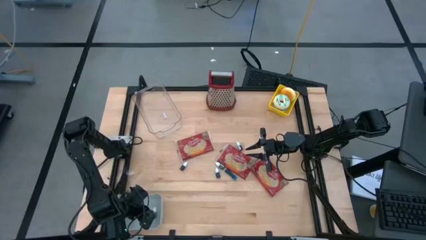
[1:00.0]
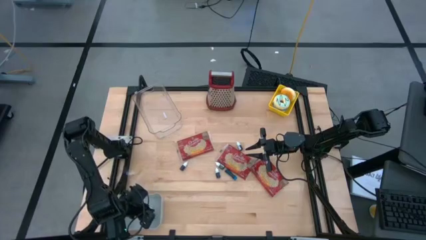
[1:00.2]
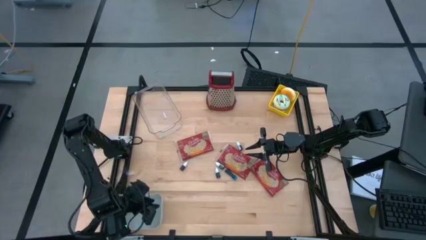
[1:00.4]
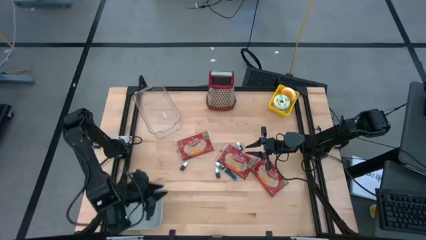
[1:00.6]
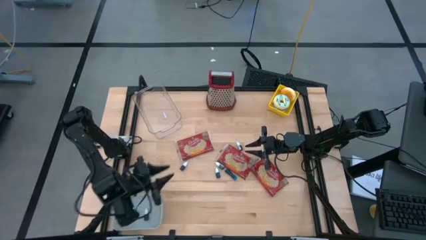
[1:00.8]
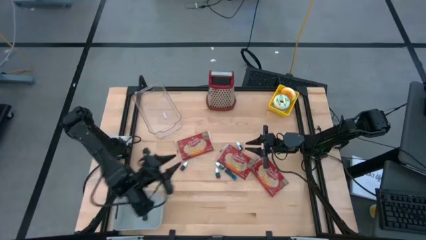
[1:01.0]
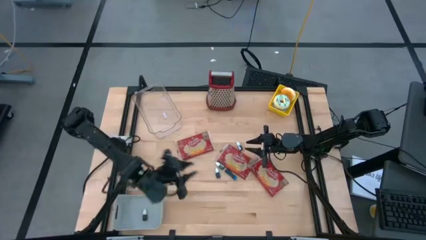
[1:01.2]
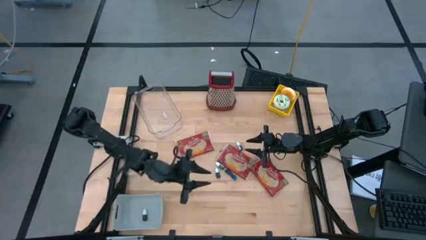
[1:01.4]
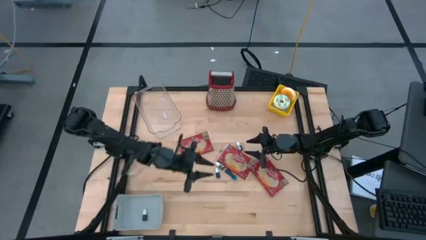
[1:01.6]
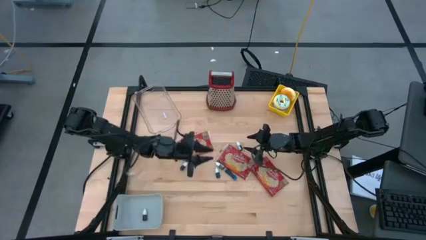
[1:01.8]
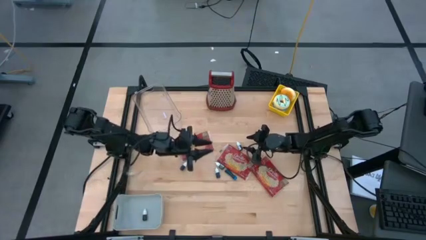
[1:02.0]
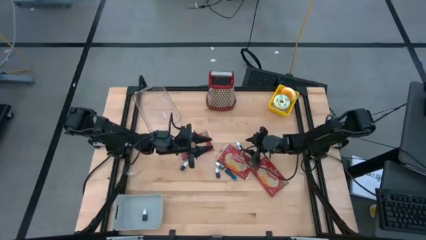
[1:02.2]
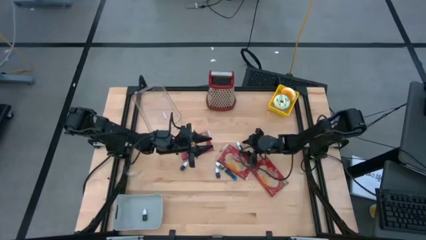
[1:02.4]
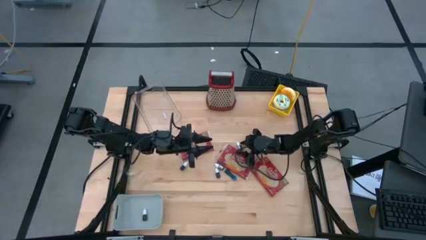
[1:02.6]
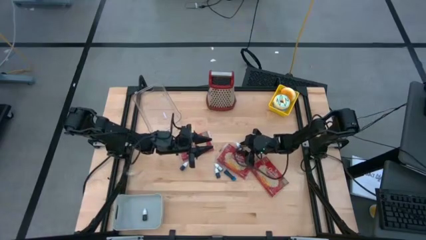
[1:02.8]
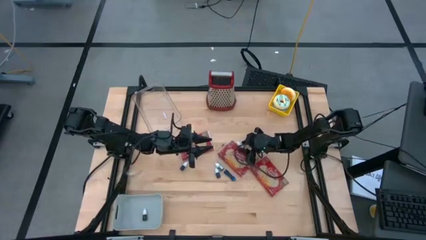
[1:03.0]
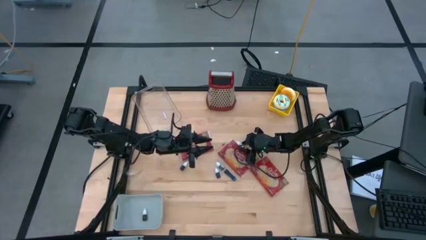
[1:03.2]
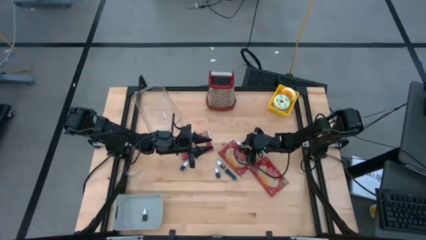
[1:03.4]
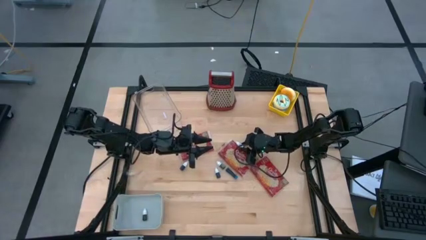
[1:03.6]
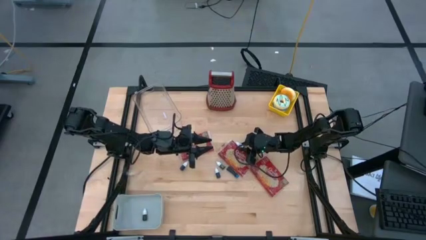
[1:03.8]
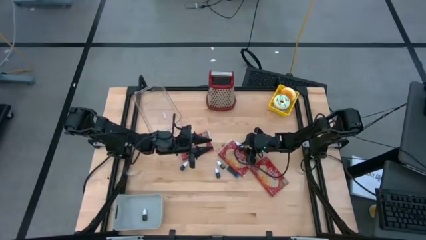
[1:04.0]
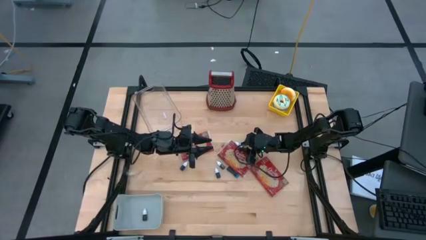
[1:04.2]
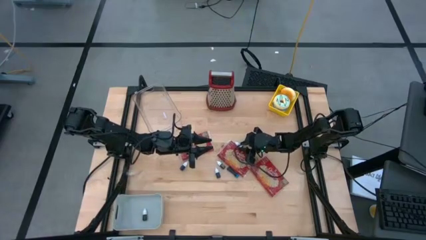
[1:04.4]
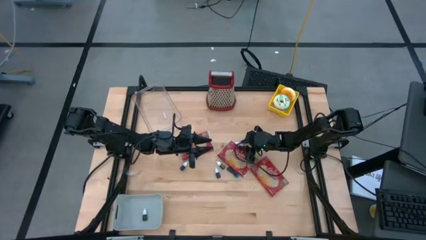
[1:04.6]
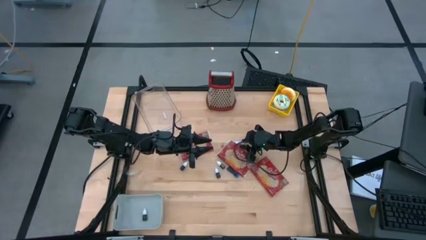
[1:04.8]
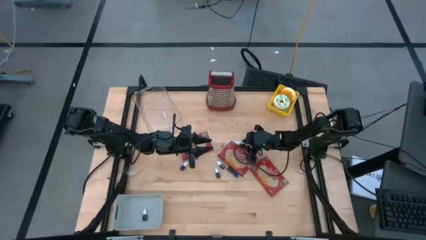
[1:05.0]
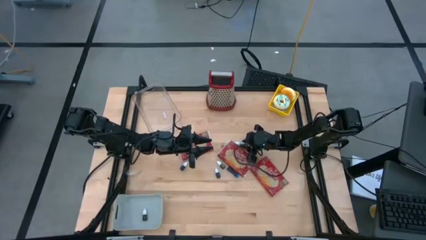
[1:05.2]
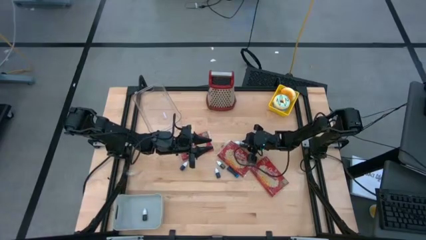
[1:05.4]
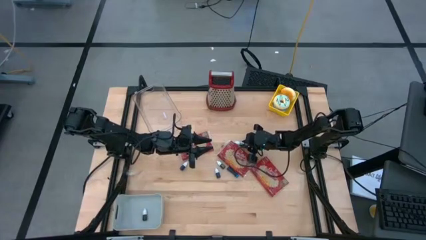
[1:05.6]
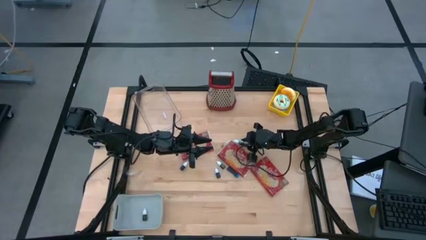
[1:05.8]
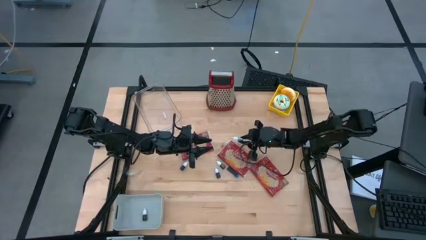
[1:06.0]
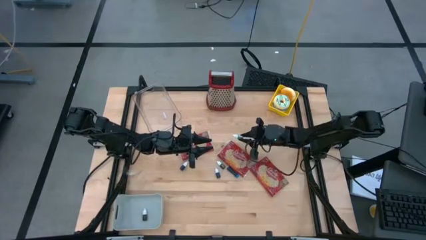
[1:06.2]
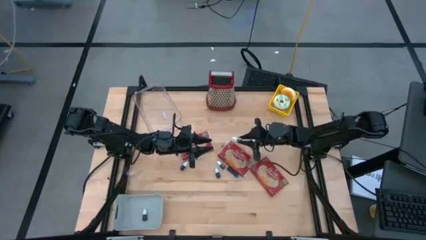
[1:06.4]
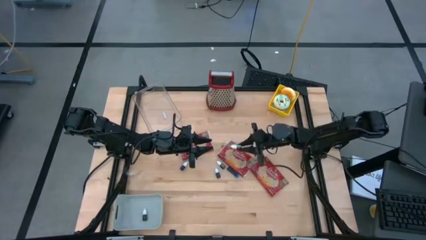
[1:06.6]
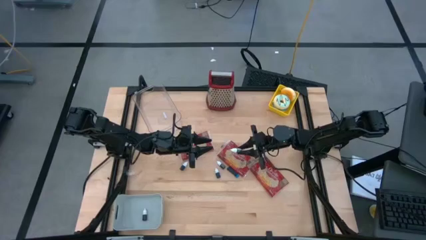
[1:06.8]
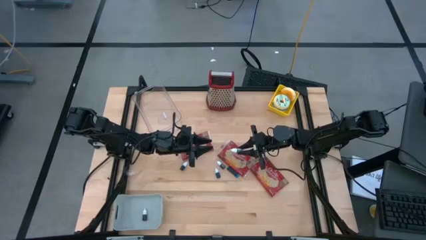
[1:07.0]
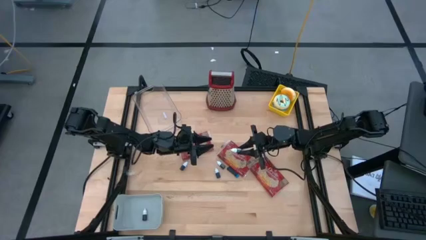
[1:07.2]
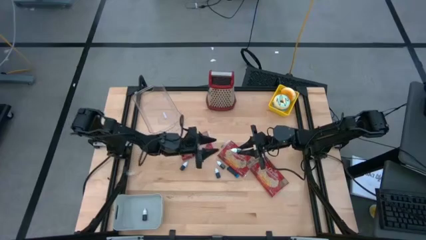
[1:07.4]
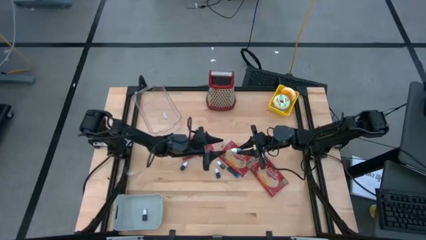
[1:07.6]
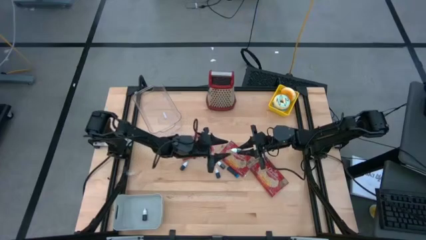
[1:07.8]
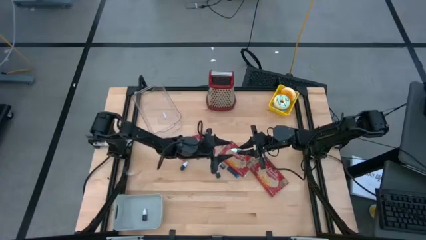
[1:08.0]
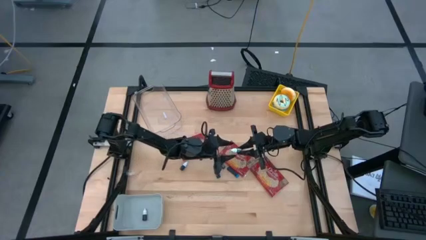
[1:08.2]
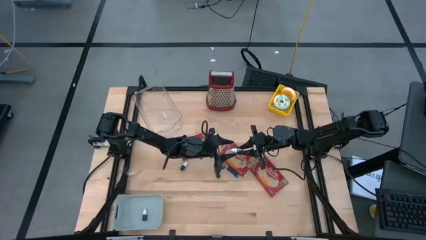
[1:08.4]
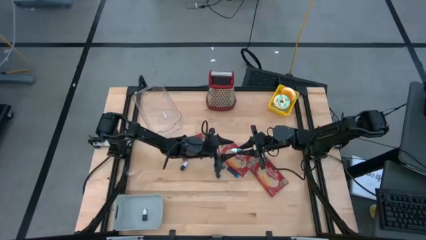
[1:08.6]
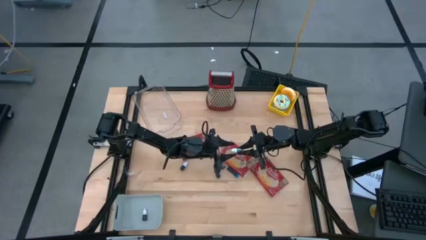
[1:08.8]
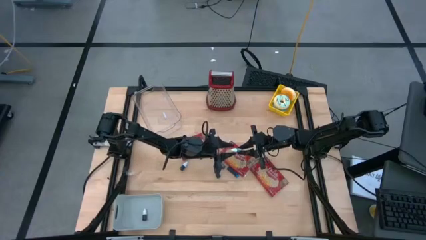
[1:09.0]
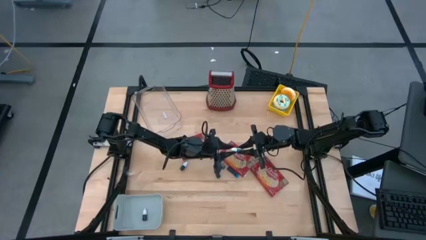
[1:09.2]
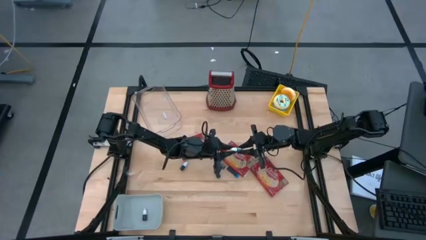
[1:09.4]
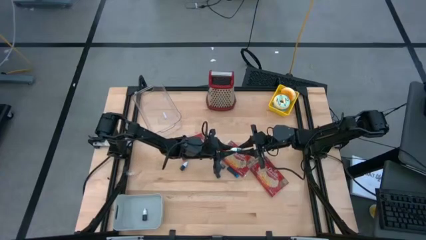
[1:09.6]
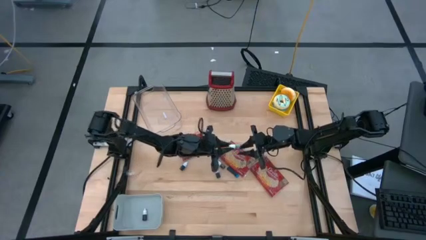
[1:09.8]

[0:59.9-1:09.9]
Put the top green food coloring bottle into the gray bin

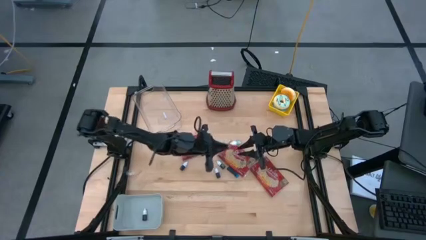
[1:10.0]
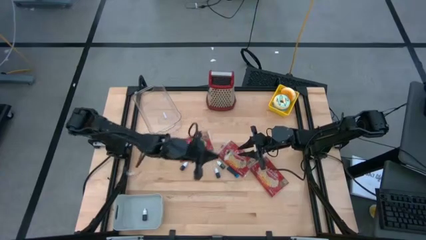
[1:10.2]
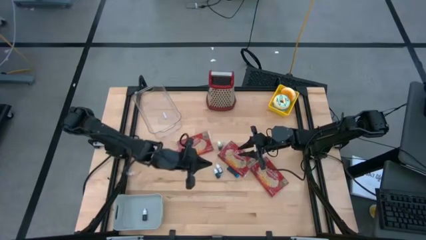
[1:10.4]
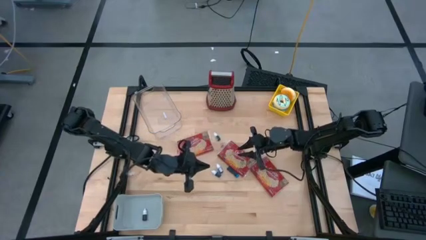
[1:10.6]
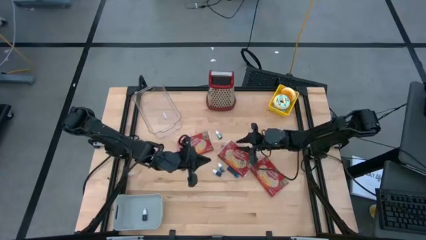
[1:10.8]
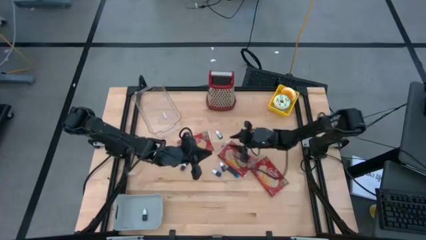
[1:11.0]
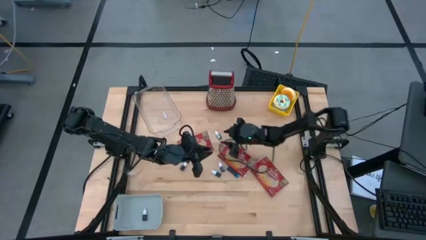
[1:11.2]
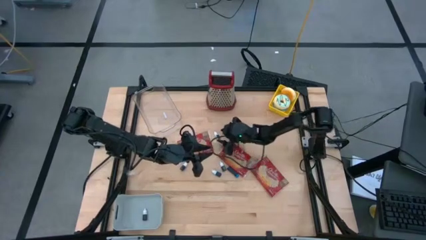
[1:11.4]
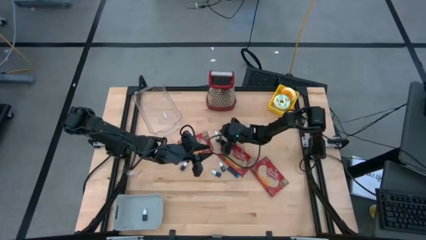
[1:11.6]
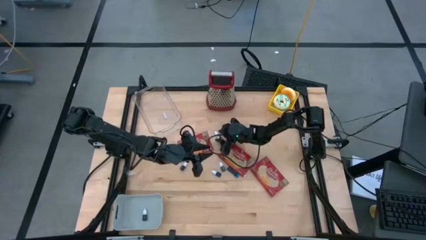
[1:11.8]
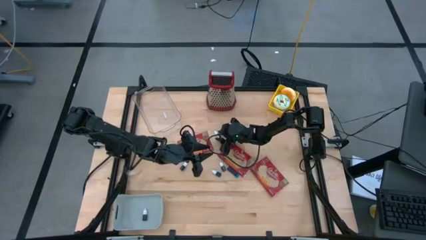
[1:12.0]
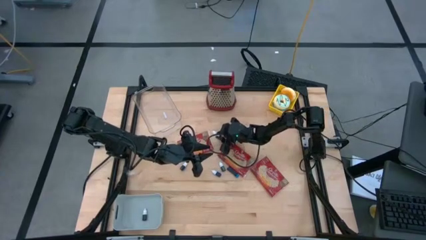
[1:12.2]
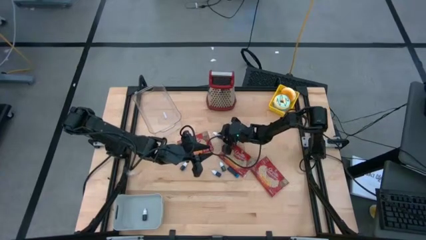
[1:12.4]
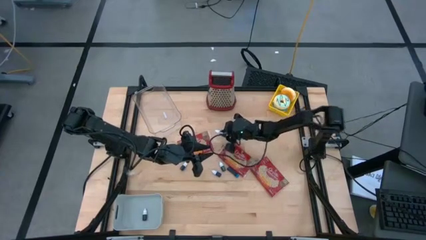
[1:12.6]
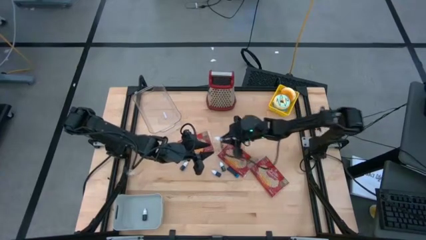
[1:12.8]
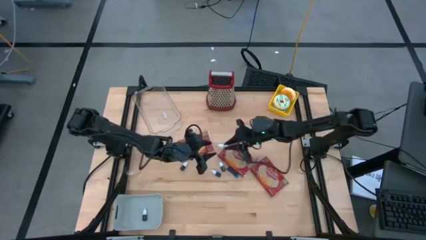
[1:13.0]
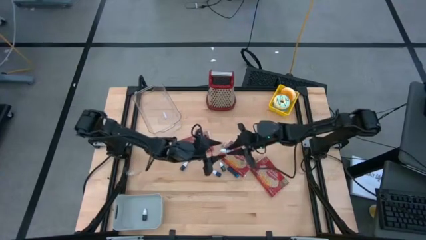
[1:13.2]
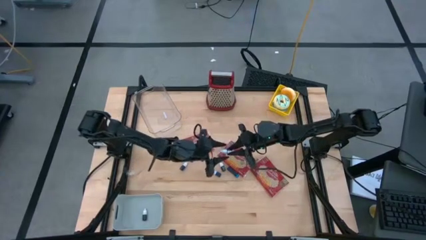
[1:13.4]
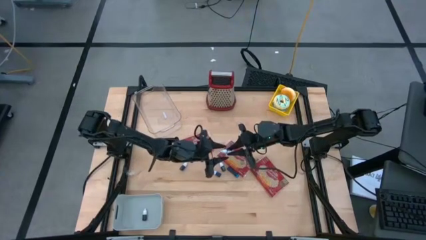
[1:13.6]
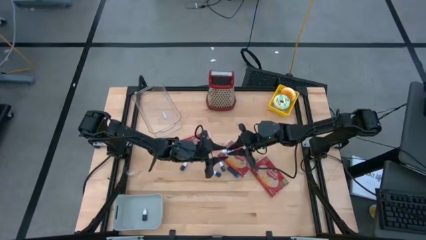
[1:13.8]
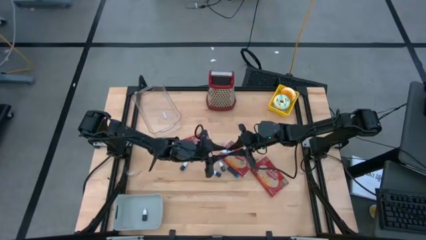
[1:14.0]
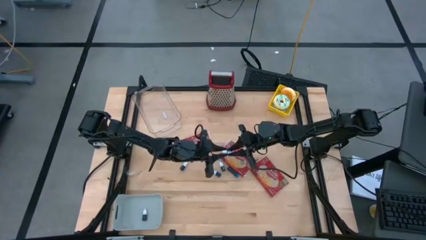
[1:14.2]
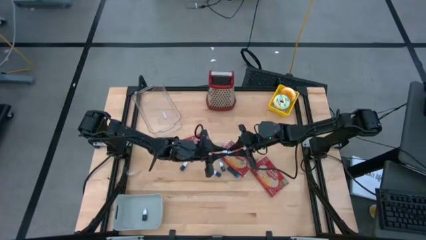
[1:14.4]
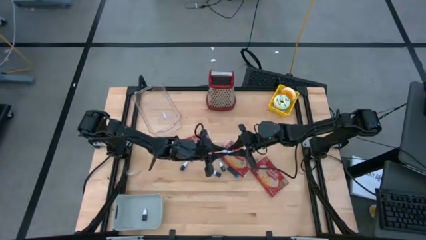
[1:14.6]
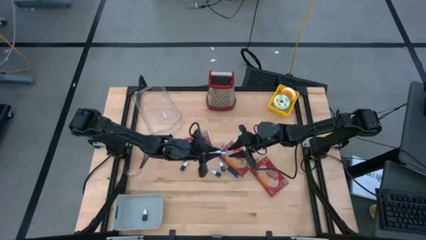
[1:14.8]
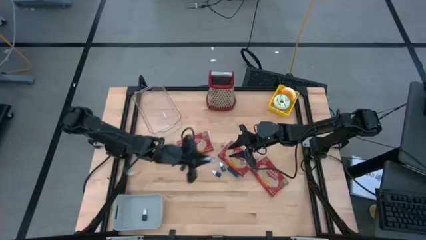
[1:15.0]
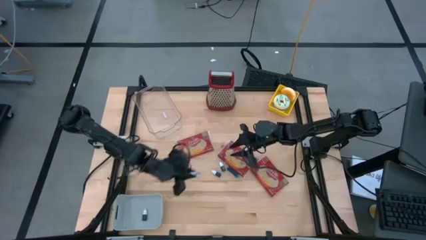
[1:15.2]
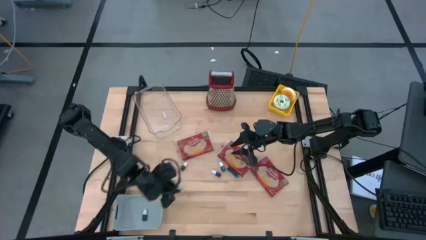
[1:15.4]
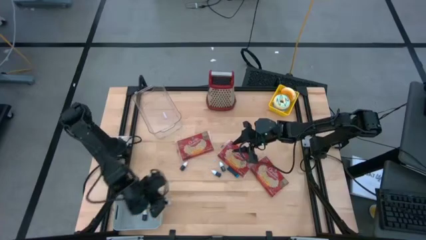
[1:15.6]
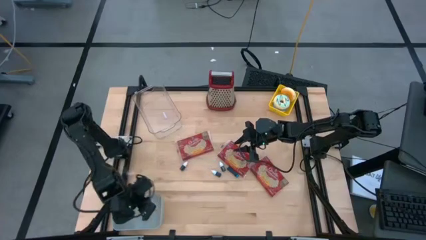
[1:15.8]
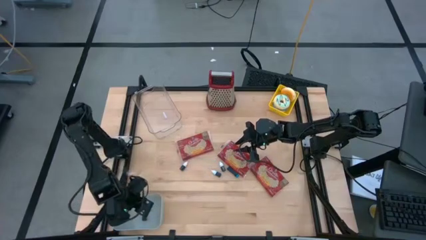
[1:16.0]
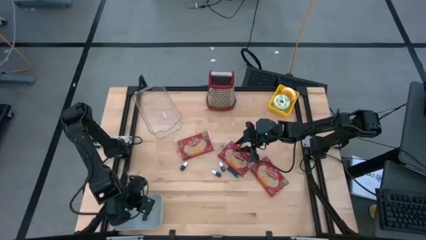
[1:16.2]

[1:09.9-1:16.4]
Put the top green food coloring bottle into the gray bin
